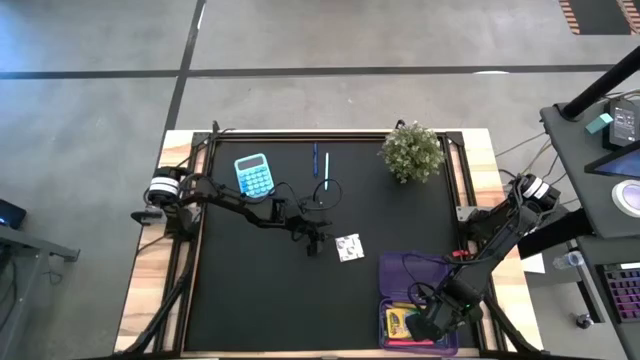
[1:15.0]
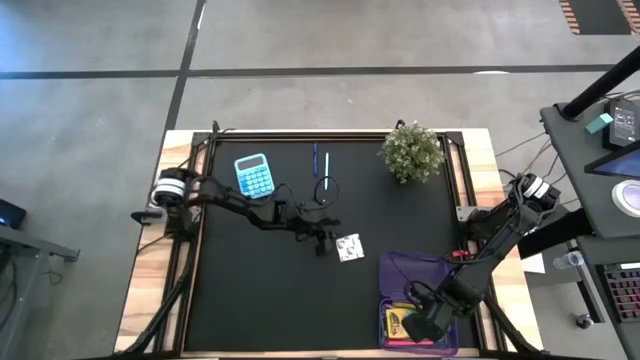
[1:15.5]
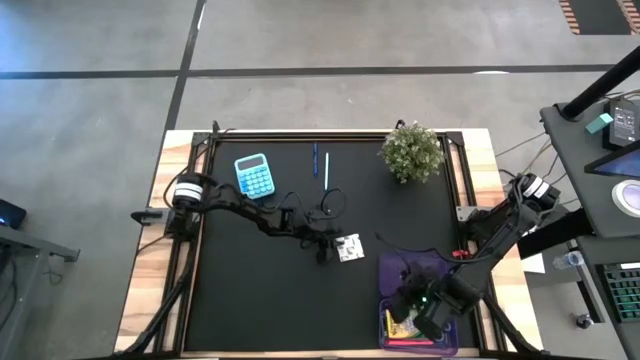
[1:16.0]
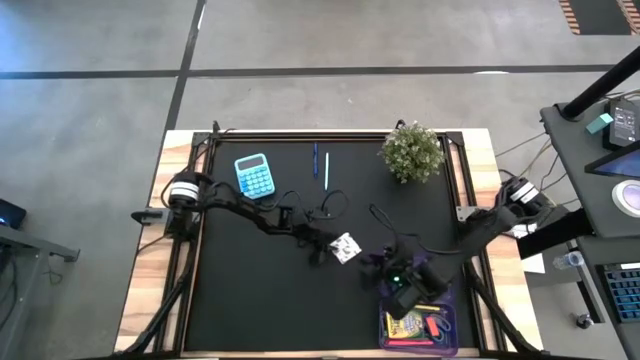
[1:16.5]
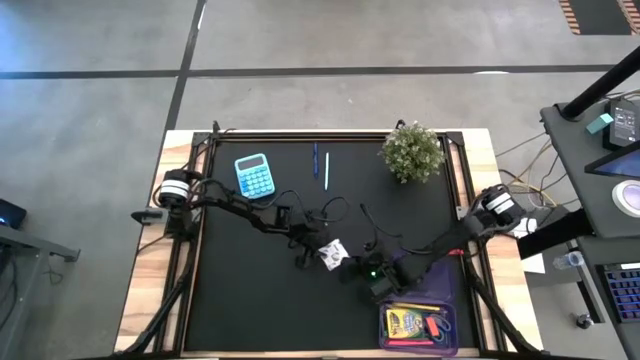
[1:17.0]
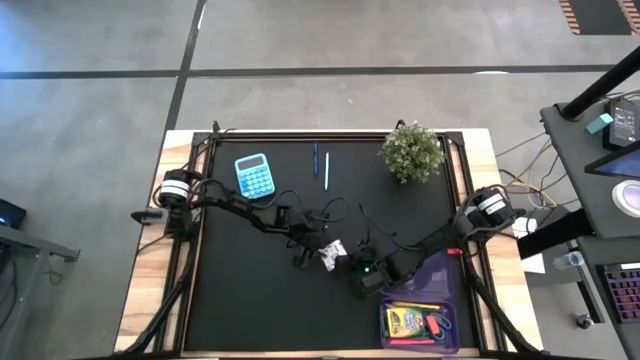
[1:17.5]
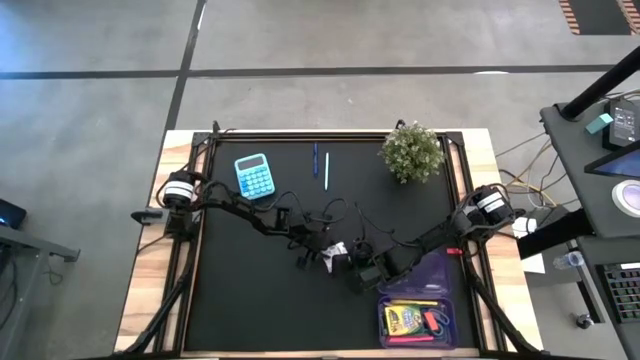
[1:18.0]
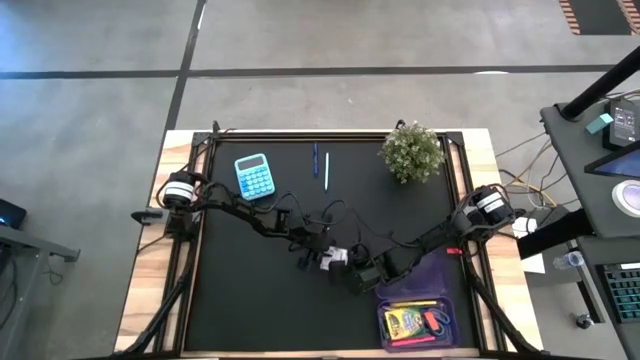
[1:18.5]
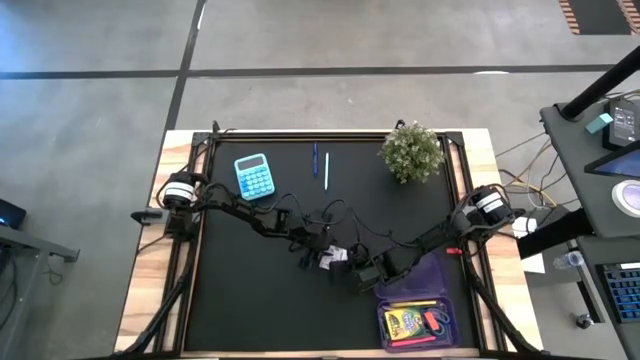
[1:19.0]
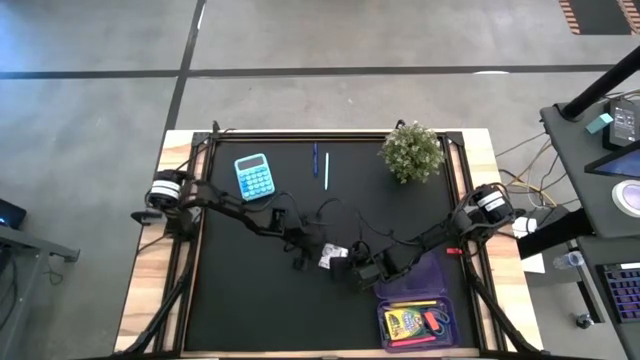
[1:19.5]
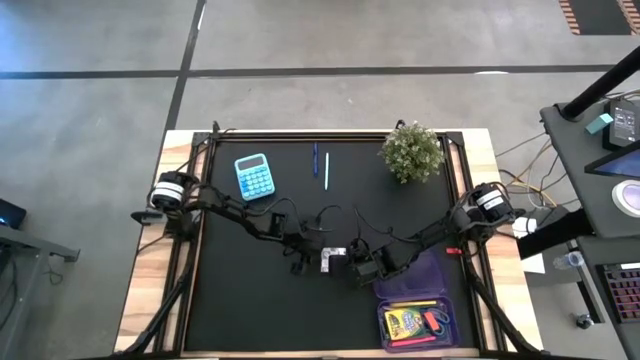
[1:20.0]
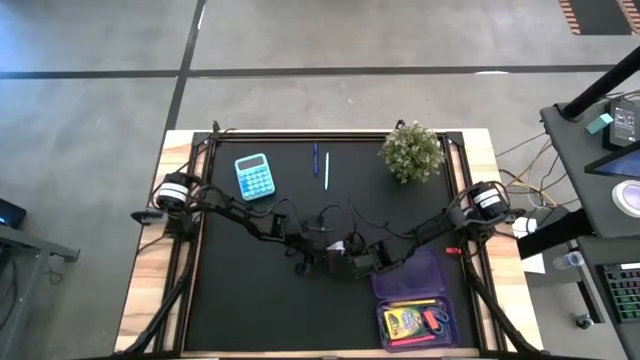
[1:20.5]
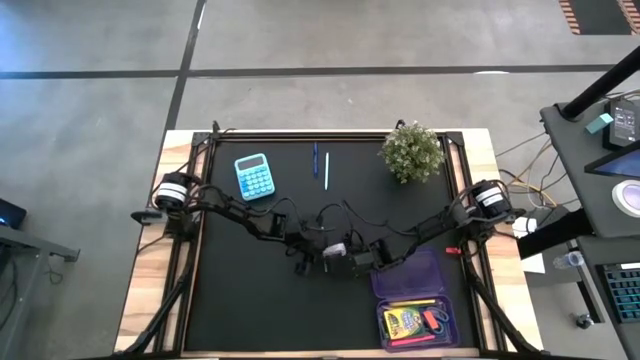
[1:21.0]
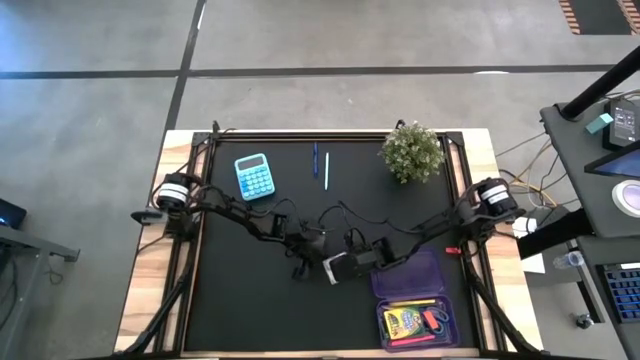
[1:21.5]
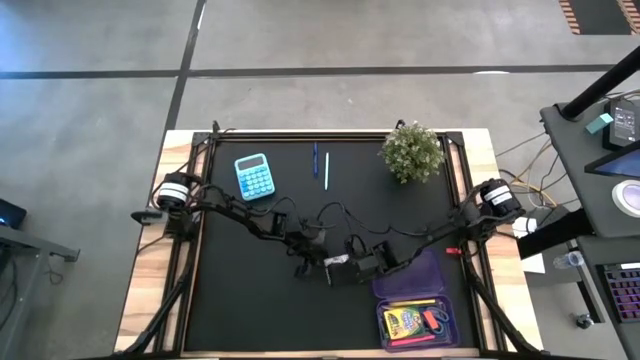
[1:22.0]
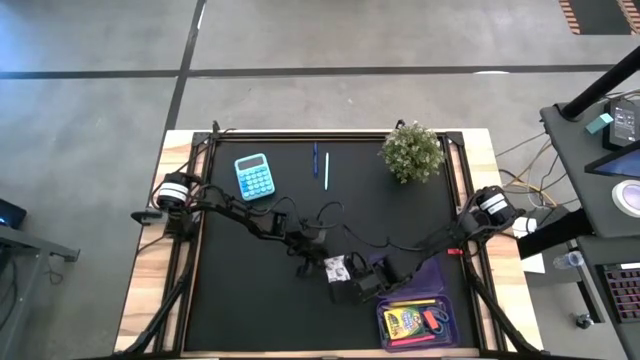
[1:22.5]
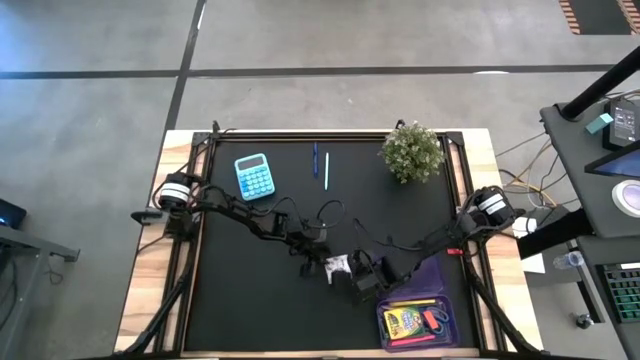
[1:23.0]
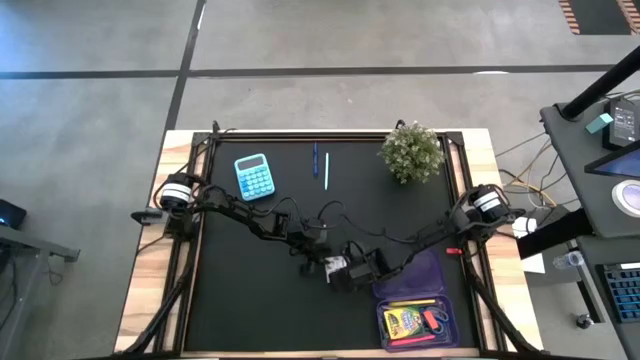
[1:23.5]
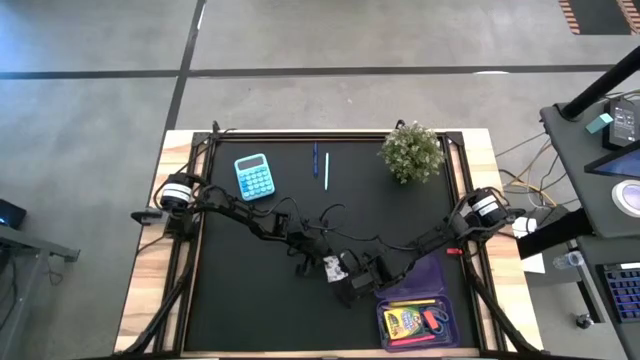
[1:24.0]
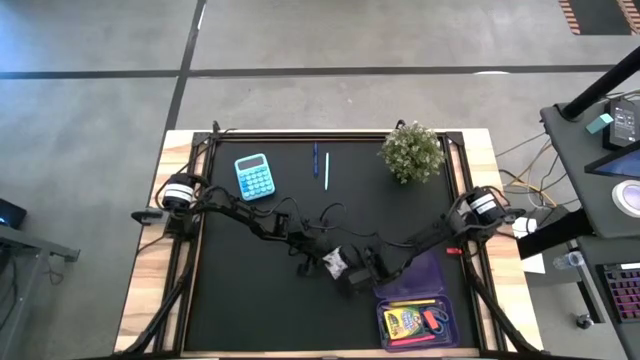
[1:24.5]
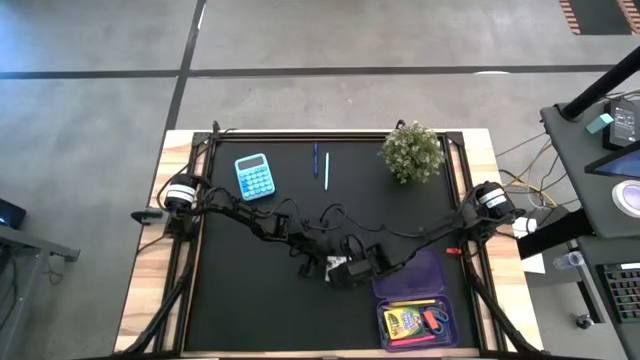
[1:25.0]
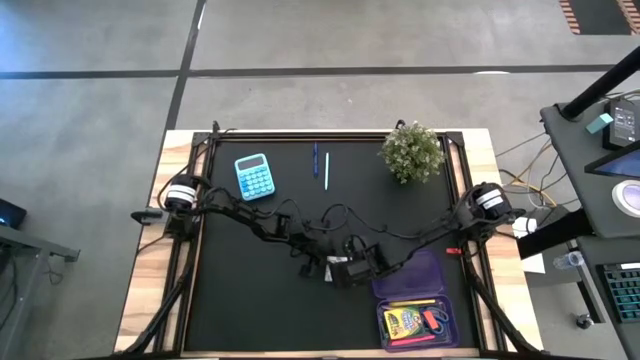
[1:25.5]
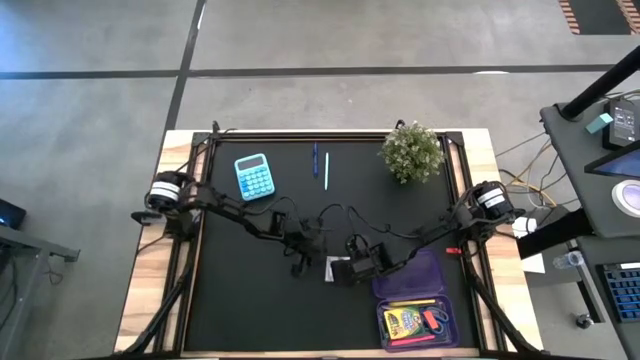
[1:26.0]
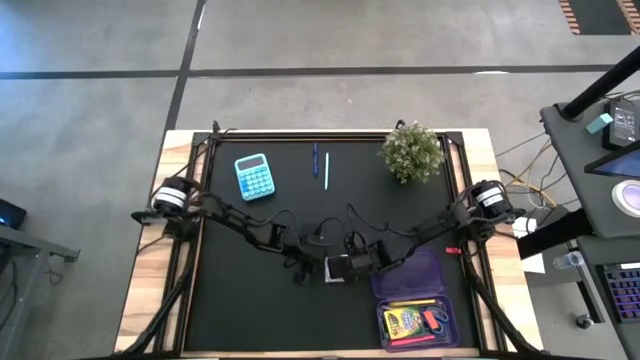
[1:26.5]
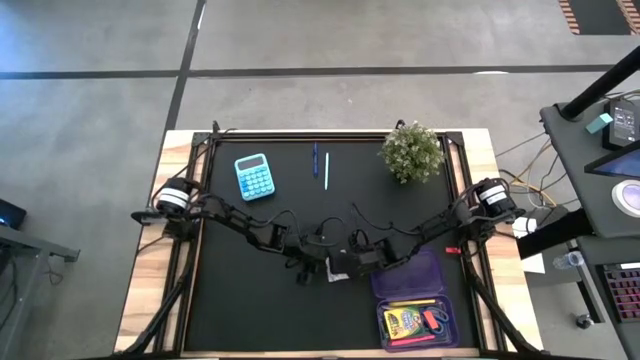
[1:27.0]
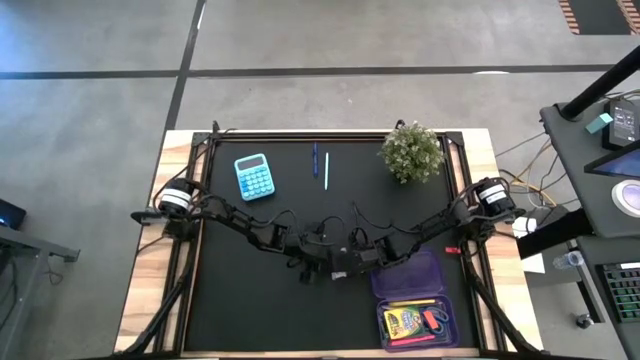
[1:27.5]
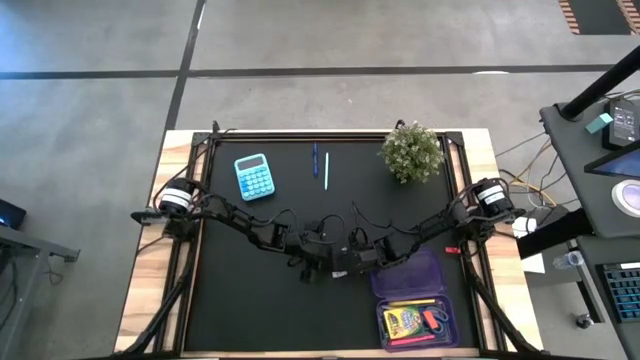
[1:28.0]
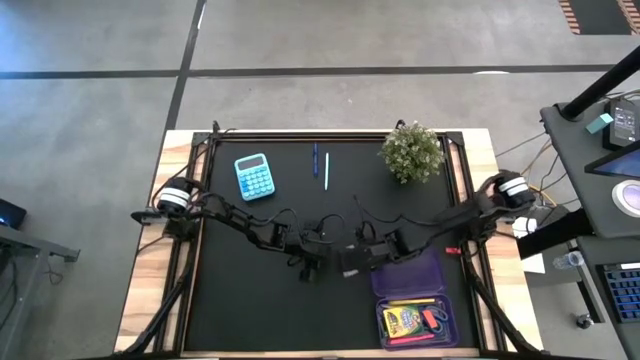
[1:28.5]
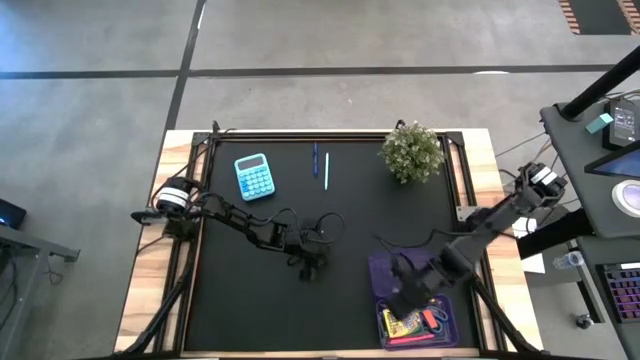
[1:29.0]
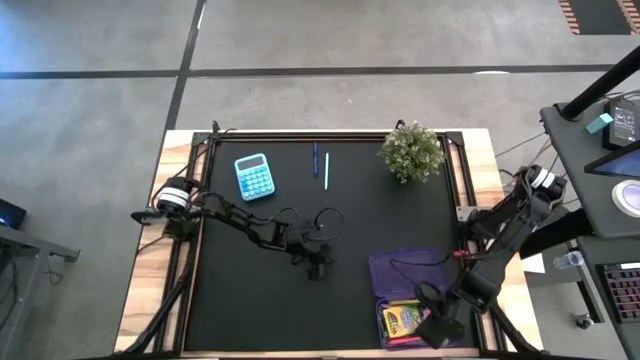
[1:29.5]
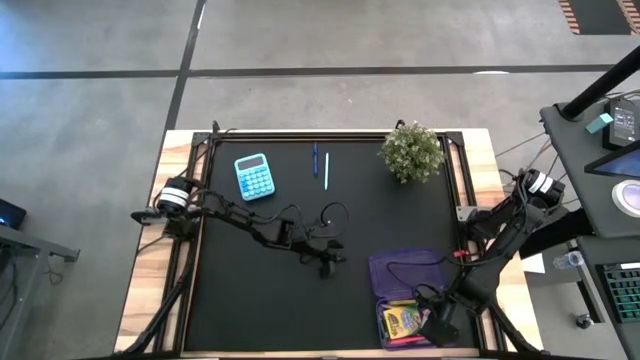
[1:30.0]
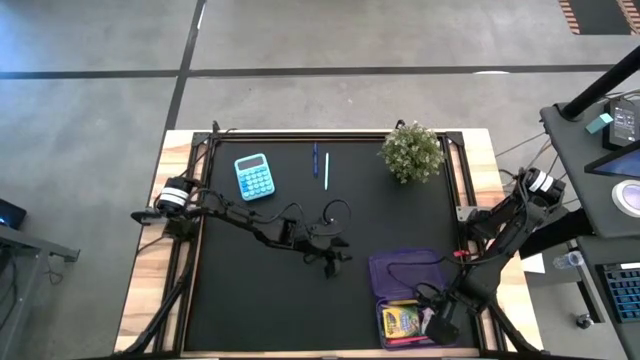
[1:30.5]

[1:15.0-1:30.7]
Task: Pack school essentials
Put the white sticky note into the purple supply box

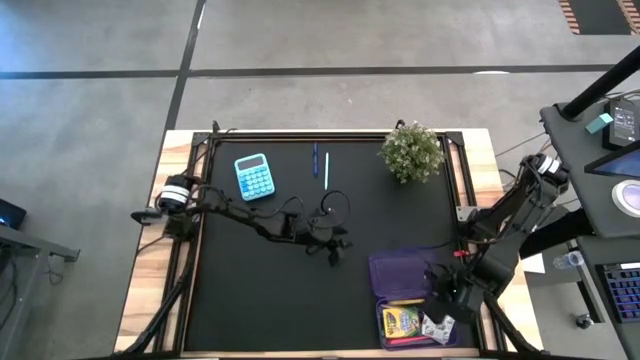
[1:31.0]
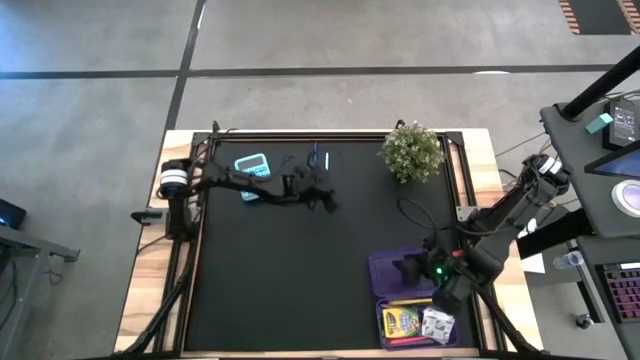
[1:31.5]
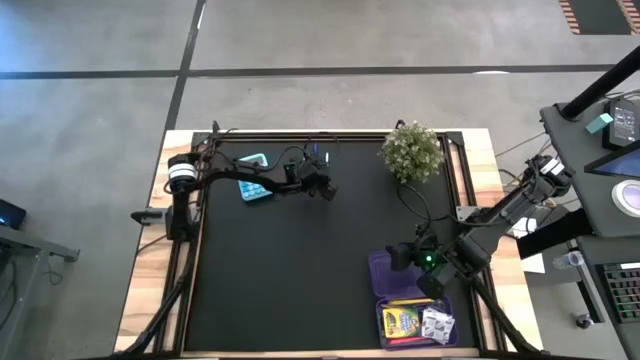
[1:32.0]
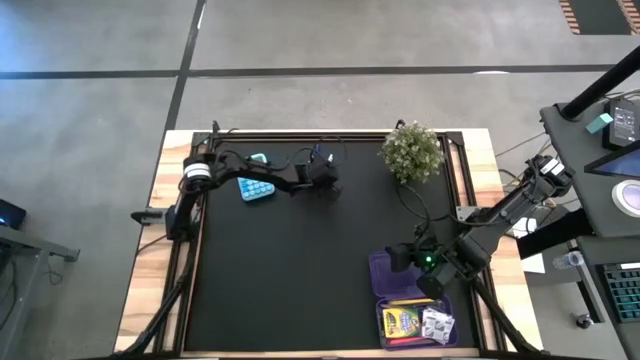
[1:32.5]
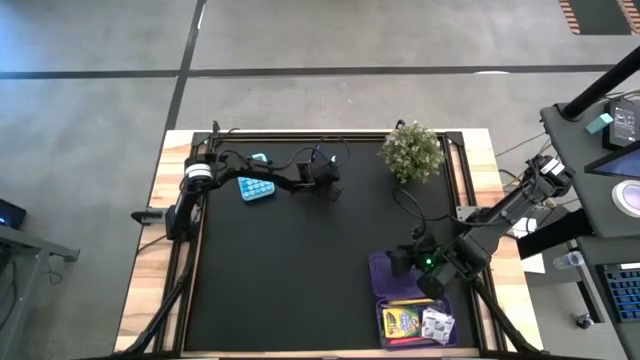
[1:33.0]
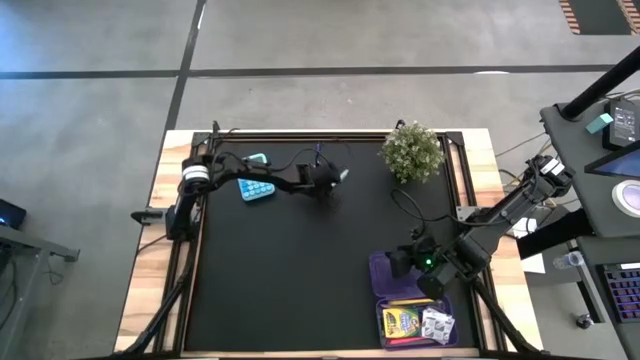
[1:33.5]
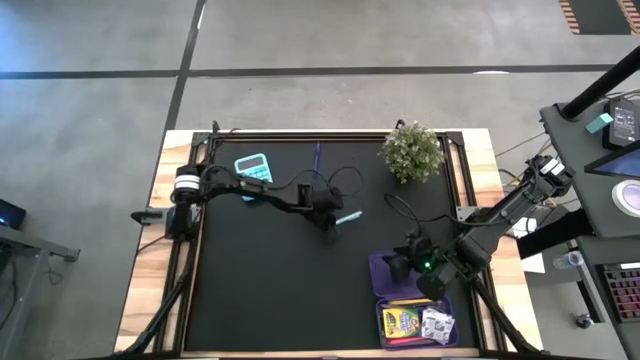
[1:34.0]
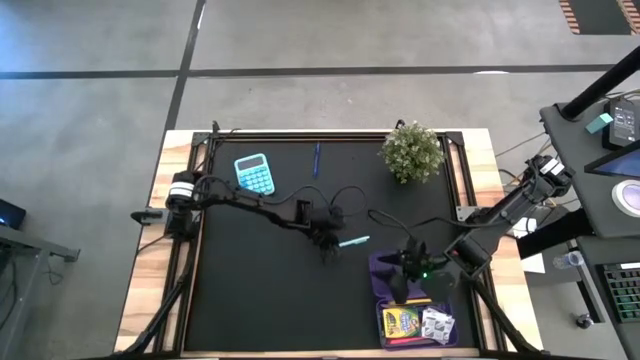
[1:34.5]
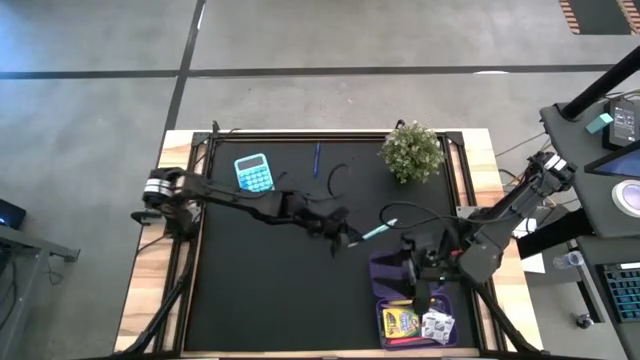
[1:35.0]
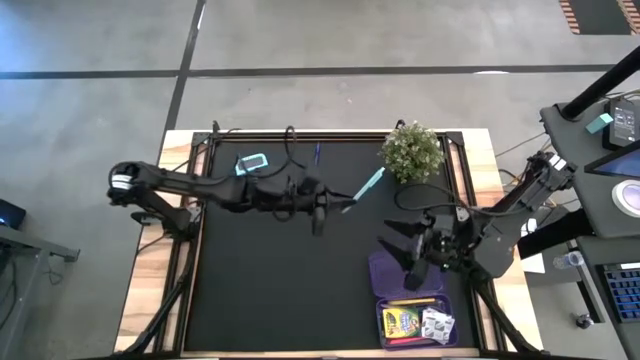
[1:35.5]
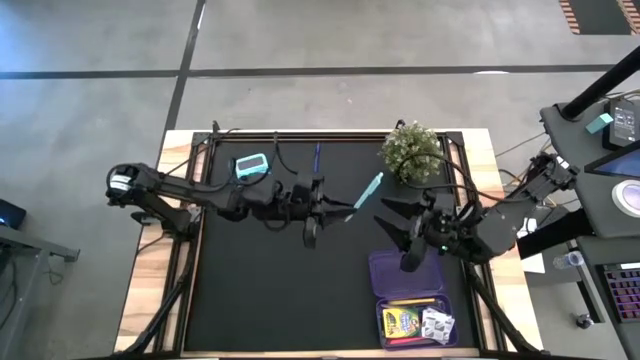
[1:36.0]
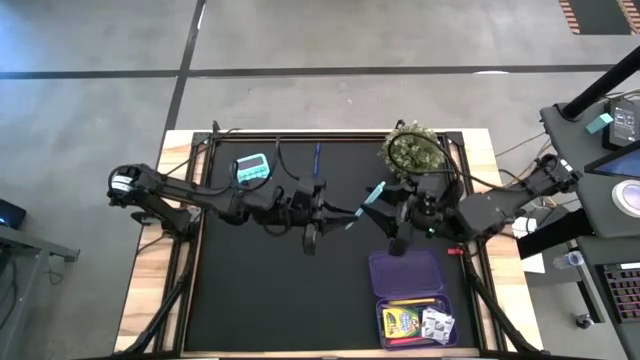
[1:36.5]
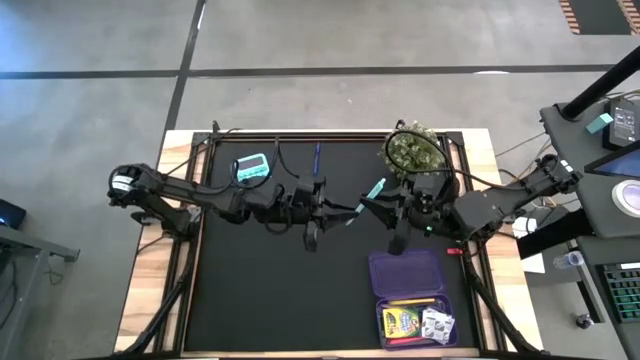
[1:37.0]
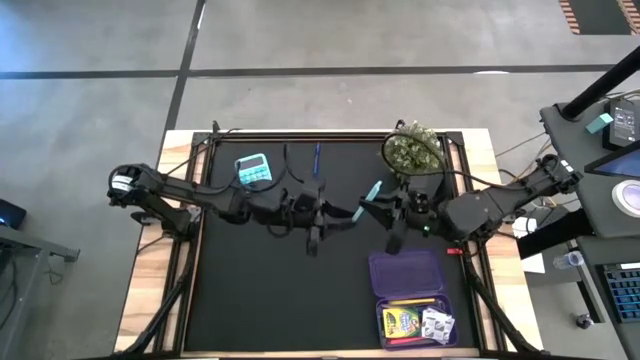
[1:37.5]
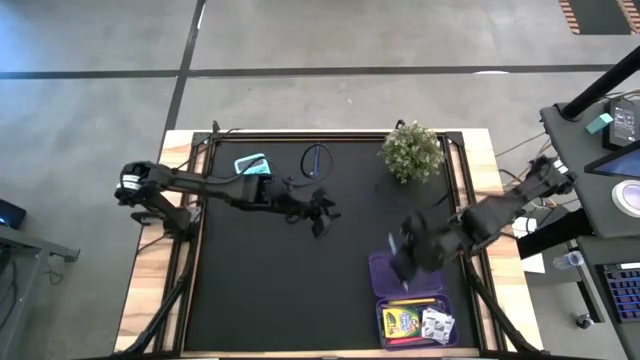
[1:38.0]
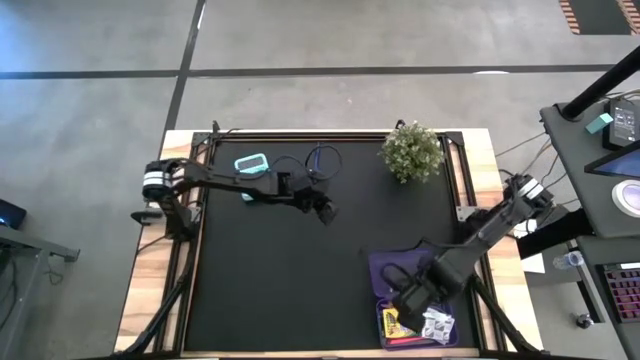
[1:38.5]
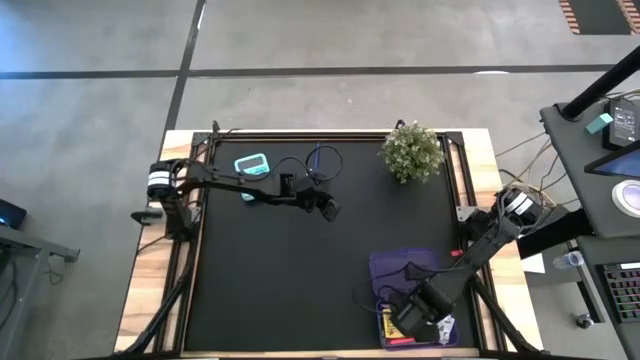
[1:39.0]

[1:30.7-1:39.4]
Put the light green pen into the purple supply box
